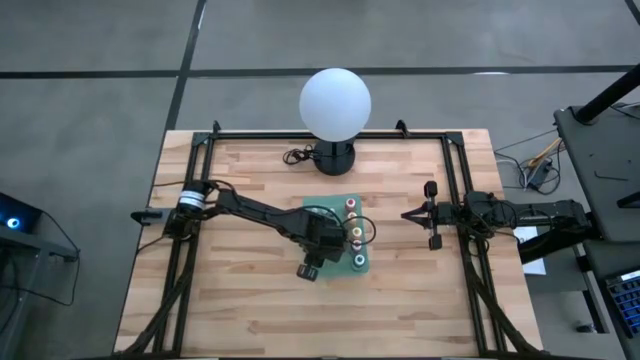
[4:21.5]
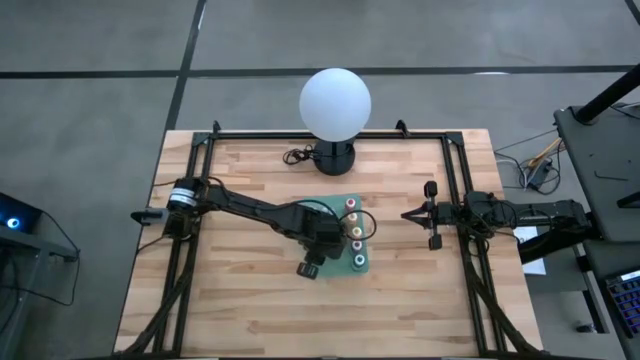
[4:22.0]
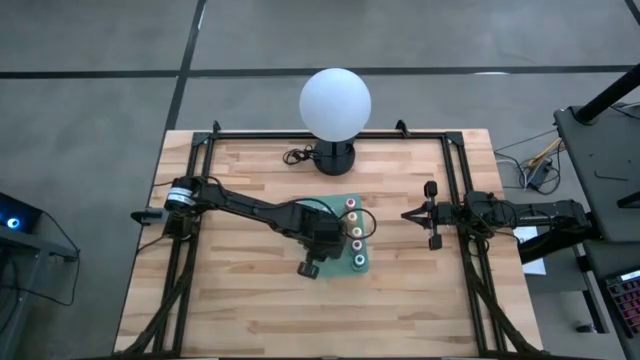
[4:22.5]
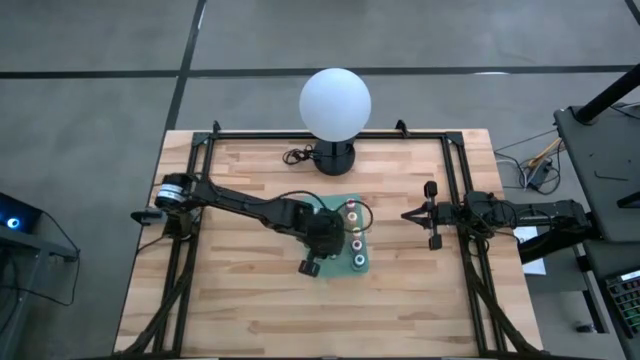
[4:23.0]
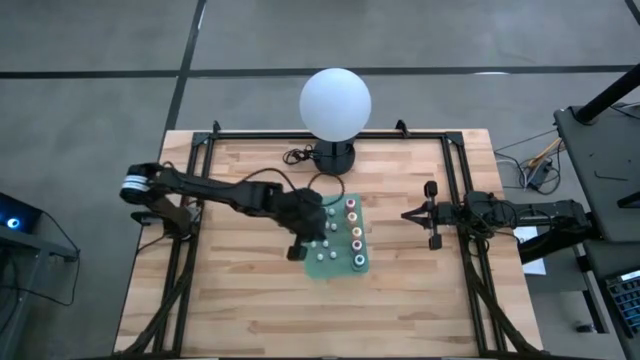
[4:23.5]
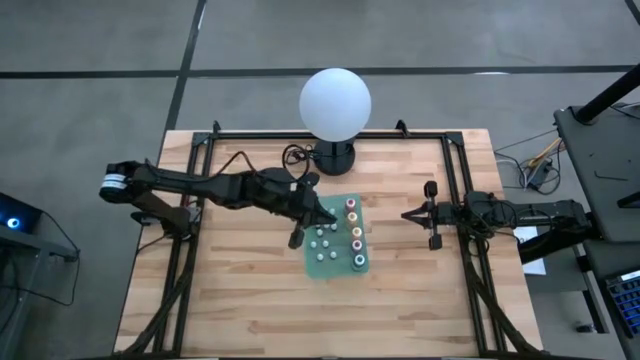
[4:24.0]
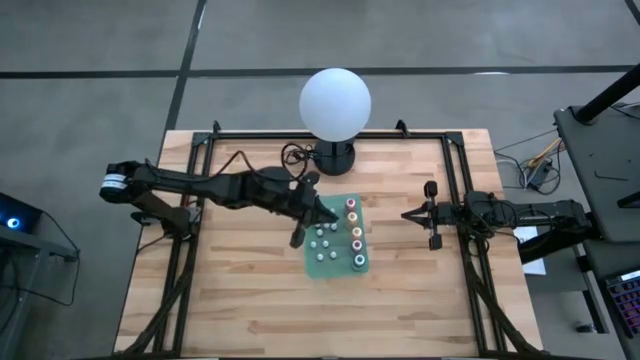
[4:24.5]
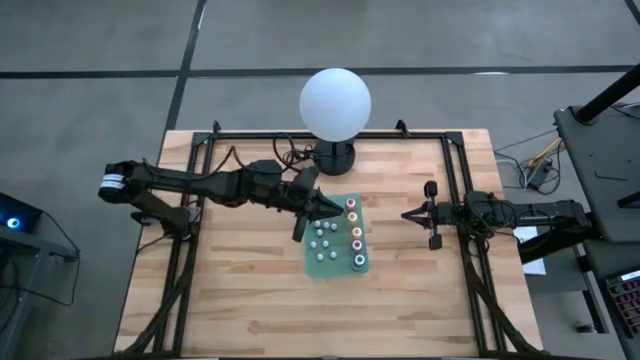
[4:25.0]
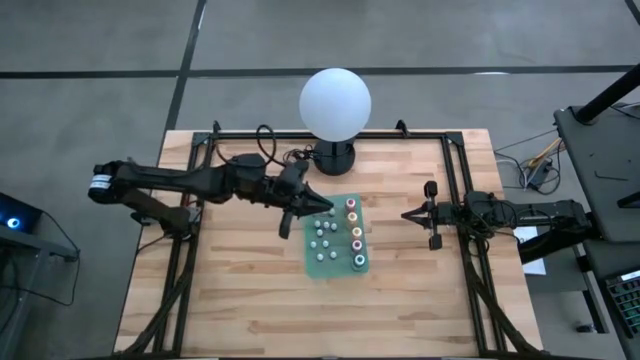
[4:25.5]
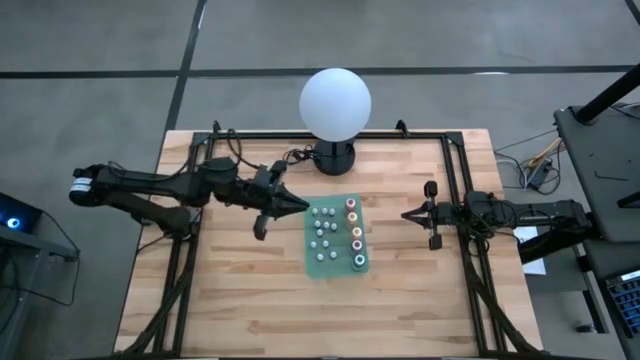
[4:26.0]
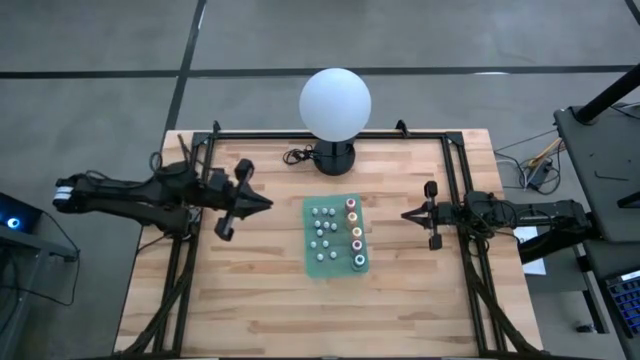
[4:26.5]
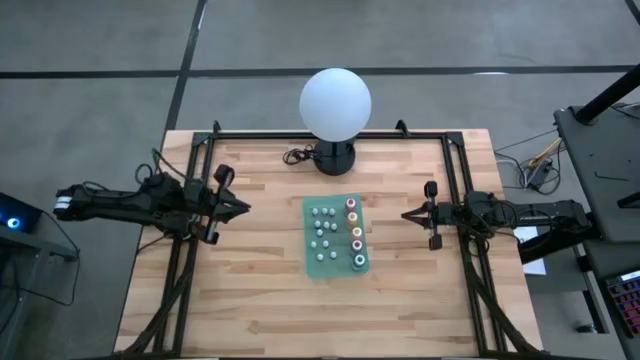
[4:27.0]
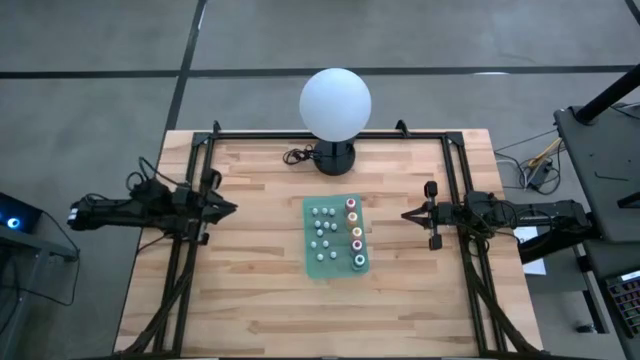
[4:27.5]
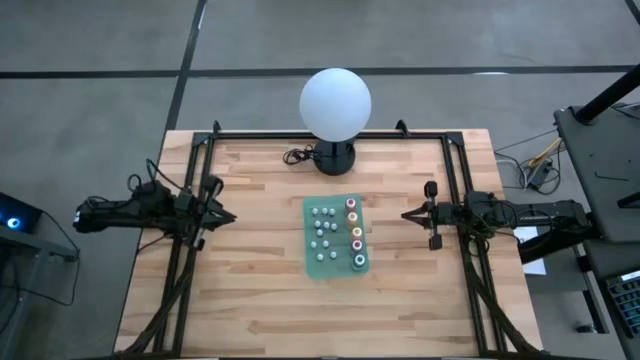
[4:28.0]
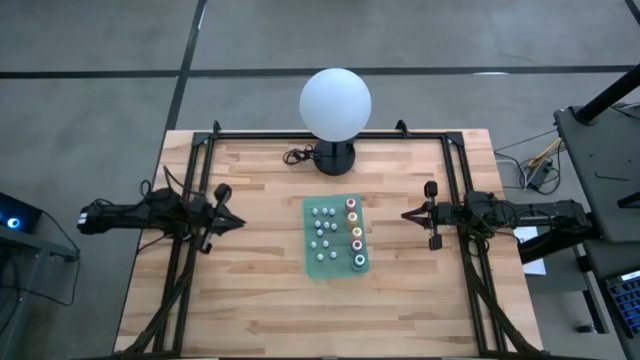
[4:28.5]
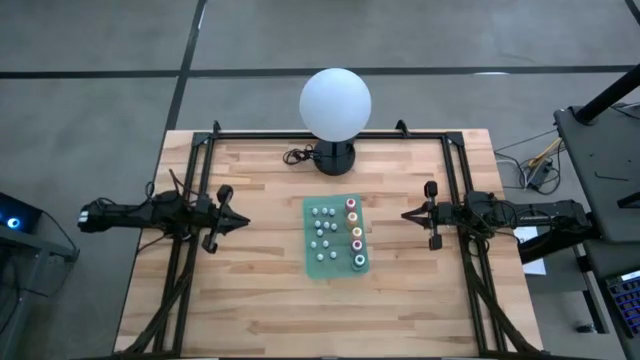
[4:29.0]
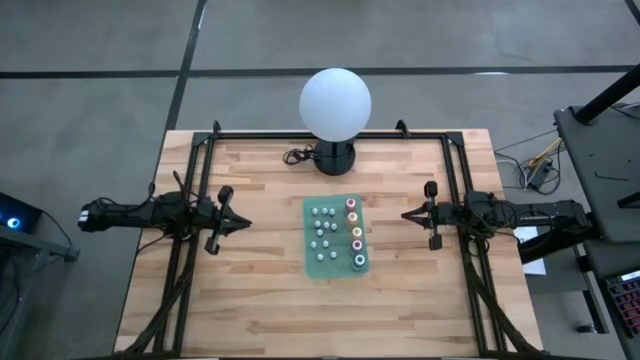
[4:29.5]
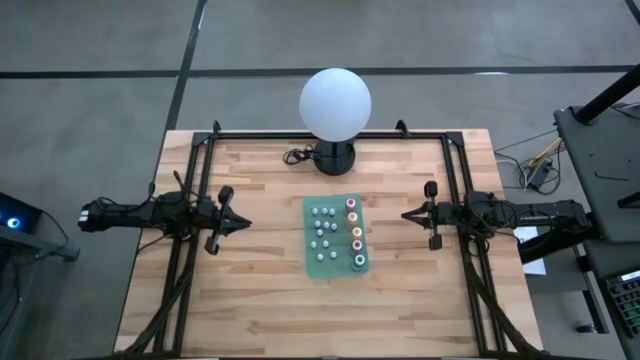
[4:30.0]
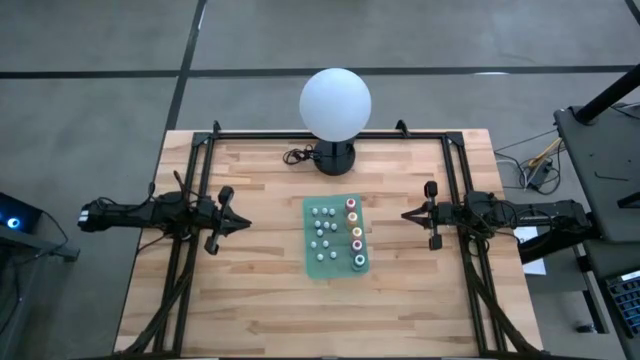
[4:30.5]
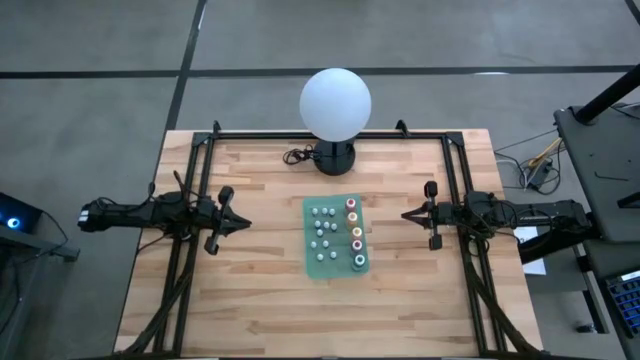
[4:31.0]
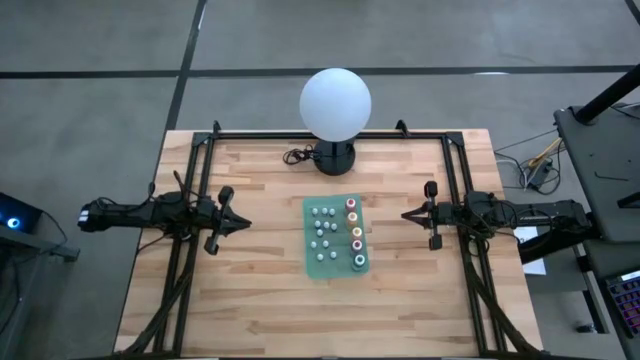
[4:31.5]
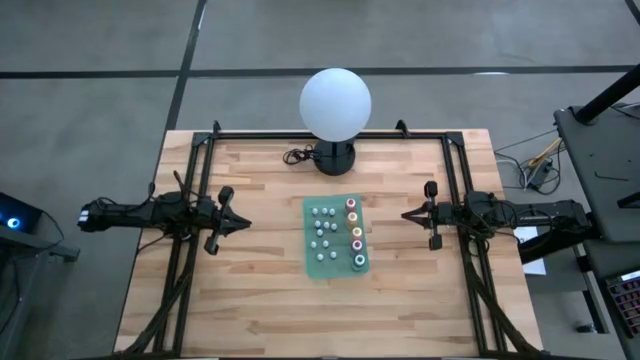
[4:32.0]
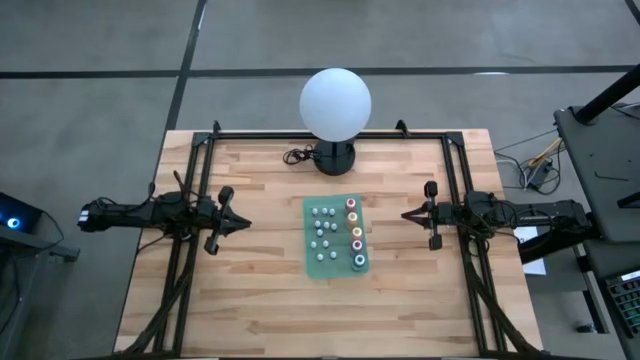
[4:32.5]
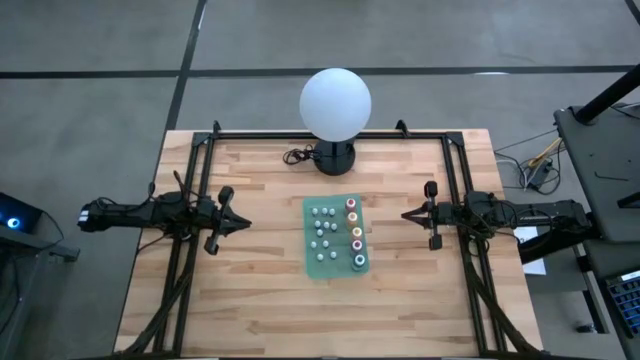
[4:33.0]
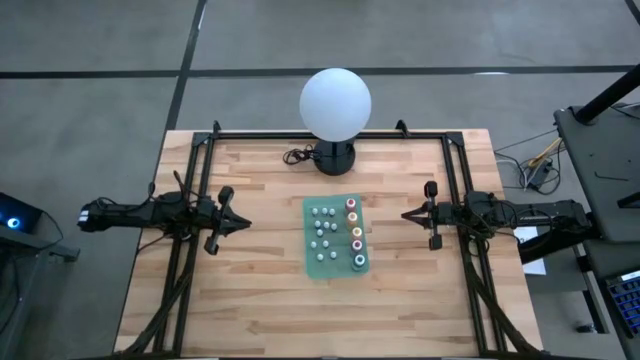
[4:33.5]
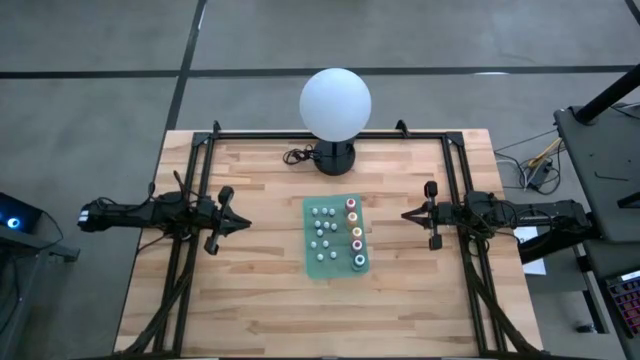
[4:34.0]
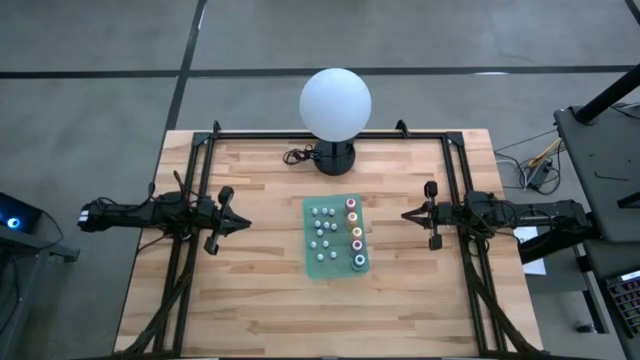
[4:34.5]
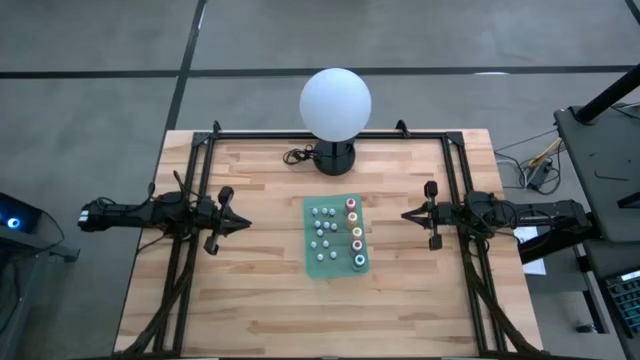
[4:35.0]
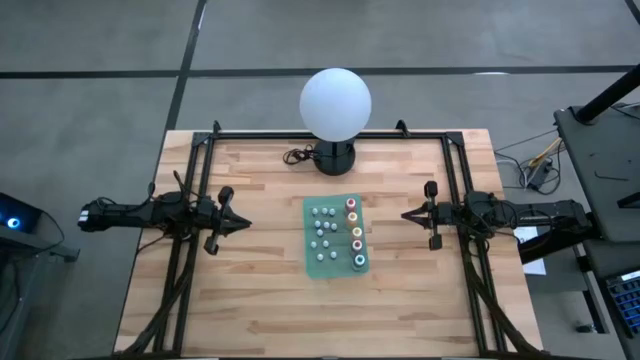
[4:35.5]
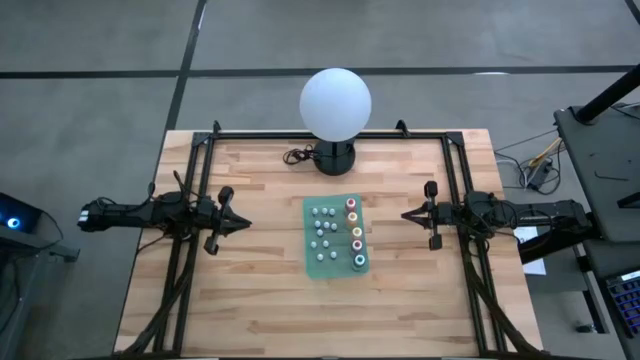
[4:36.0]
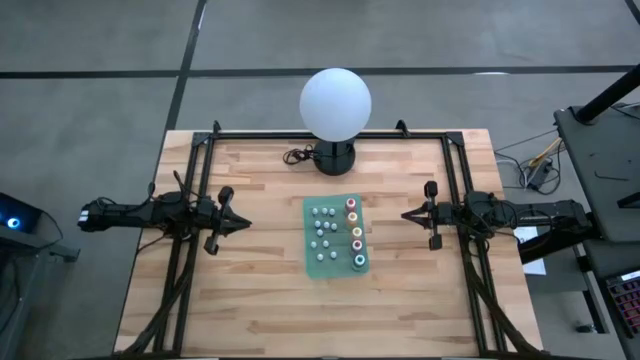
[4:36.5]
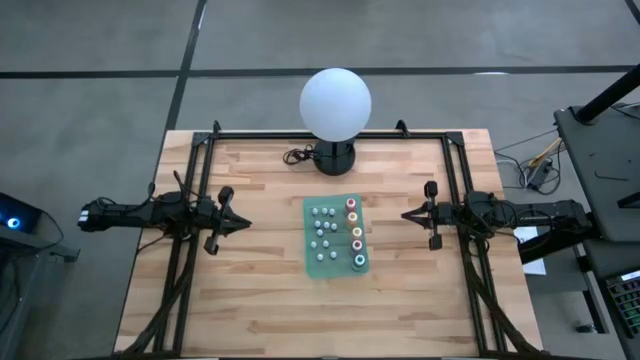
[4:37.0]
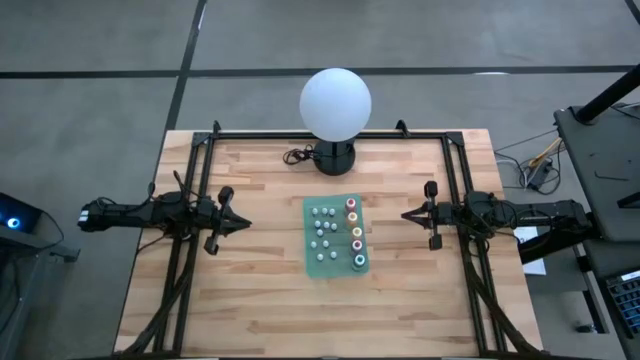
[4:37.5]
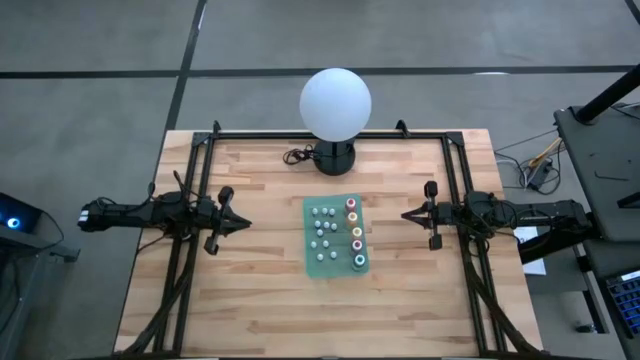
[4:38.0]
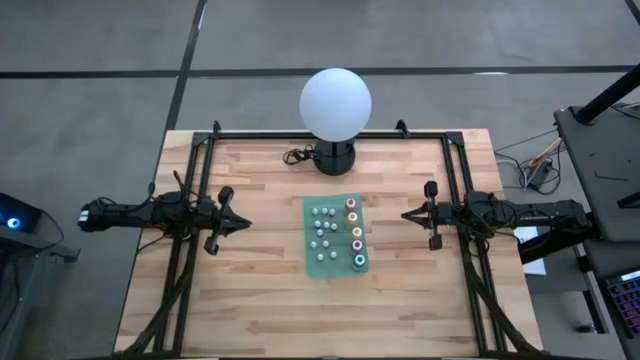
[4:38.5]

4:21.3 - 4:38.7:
Task: Pick & Place food coloring
Return to Home Position

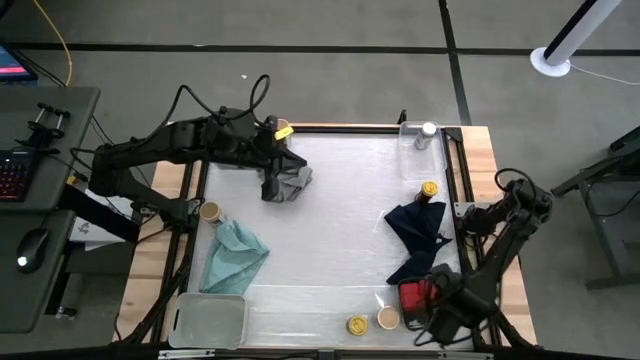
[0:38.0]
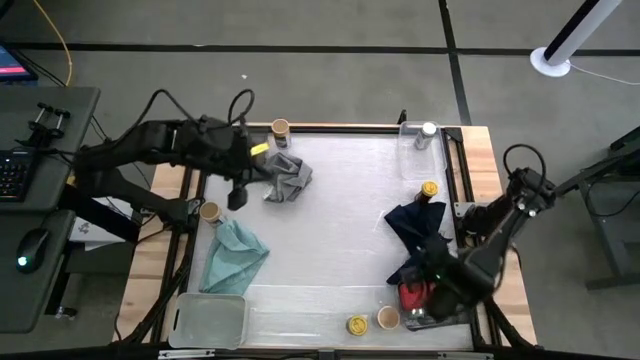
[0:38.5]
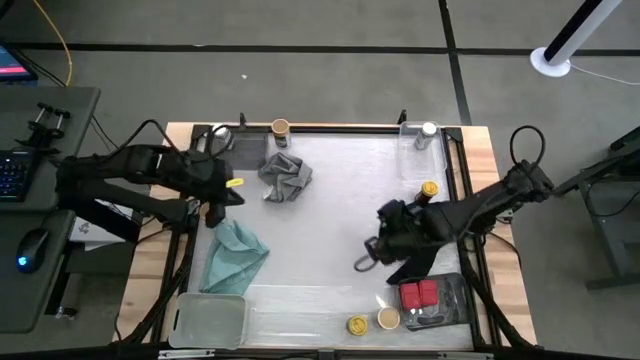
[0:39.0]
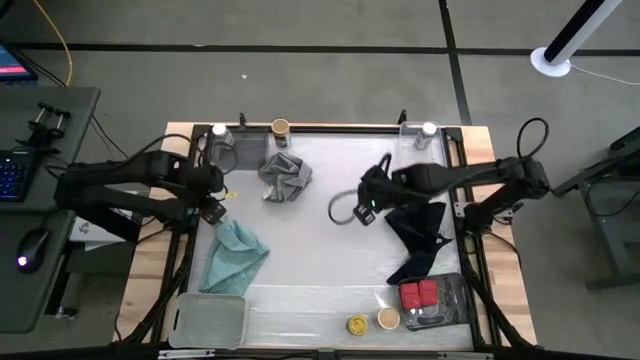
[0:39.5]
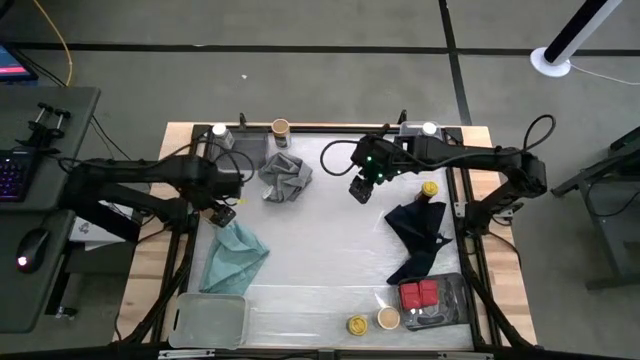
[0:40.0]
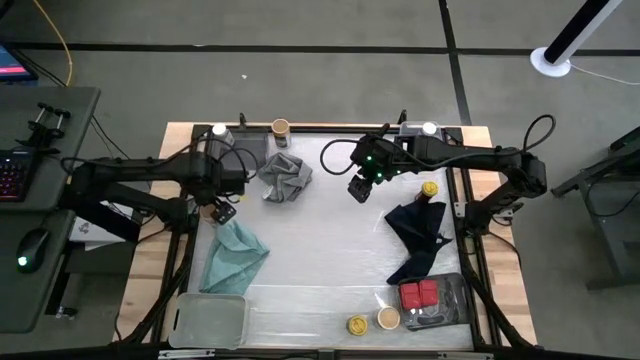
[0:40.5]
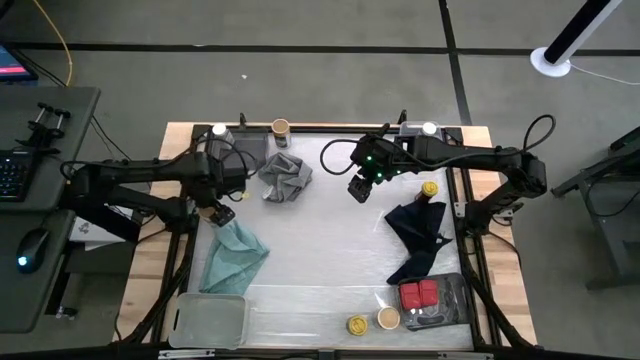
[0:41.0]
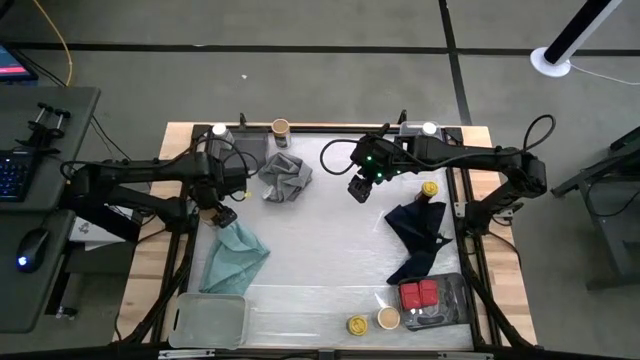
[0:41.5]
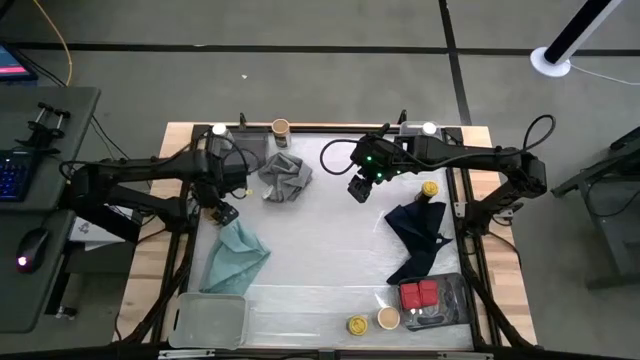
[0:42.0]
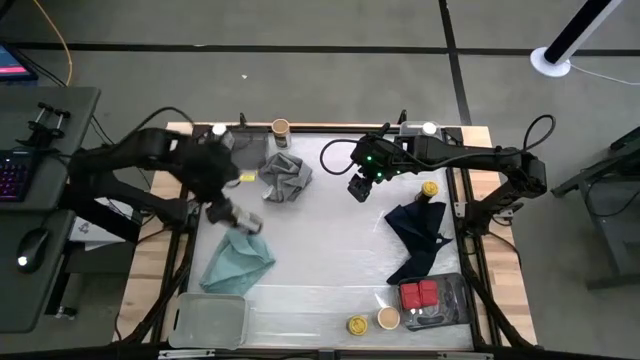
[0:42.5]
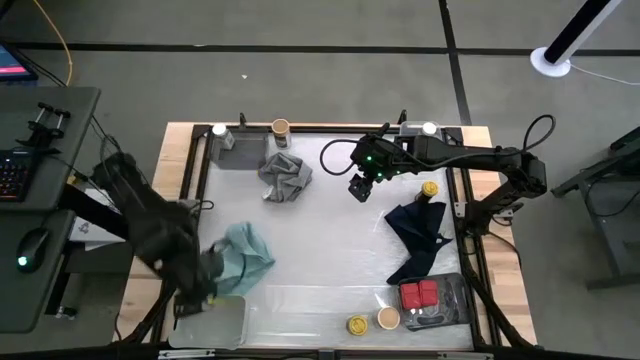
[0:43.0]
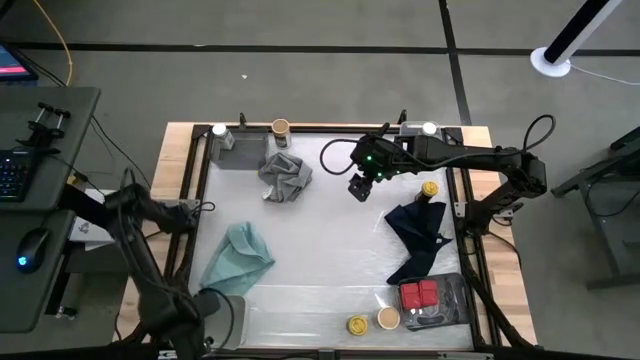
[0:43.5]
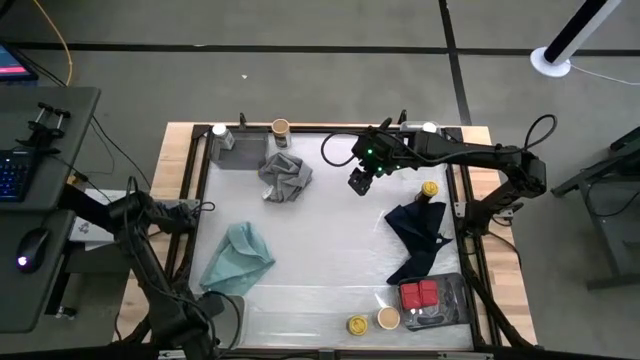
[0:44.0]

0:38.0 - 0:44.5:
Task: Sort spices by type
Put the middle brown seasoning bottle into the white bin
